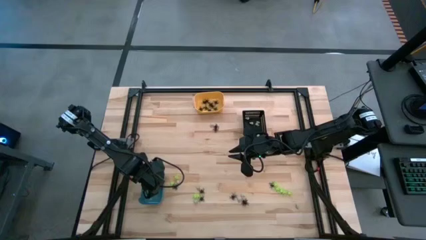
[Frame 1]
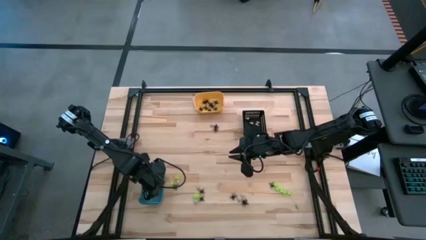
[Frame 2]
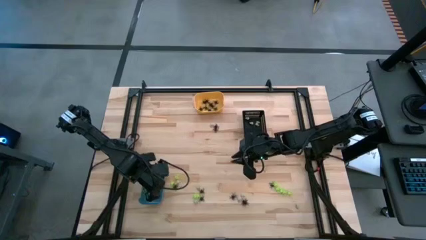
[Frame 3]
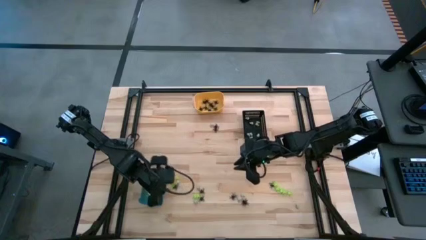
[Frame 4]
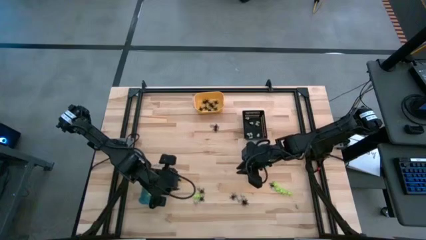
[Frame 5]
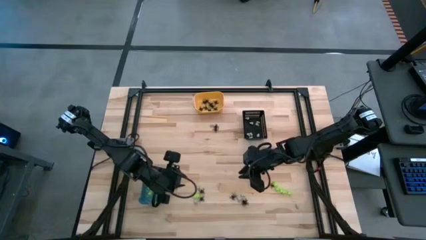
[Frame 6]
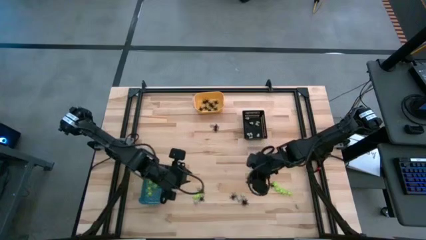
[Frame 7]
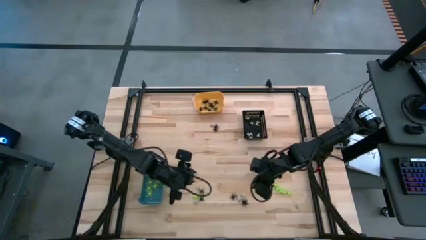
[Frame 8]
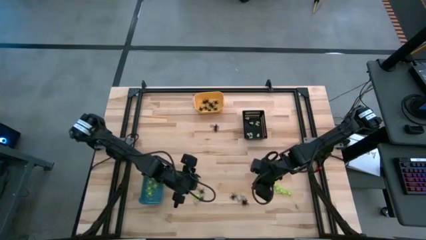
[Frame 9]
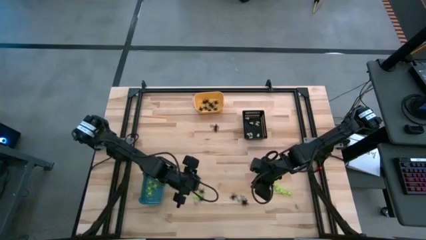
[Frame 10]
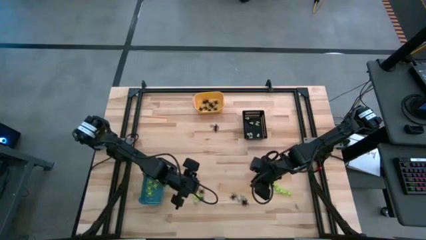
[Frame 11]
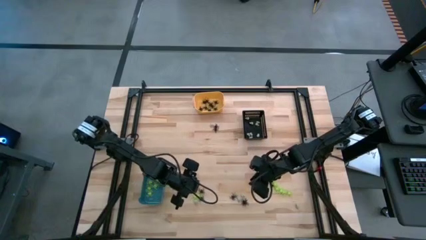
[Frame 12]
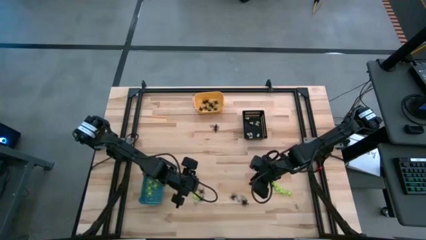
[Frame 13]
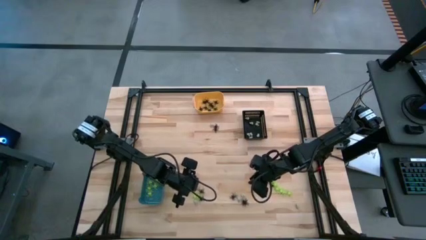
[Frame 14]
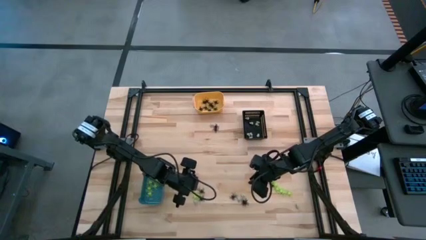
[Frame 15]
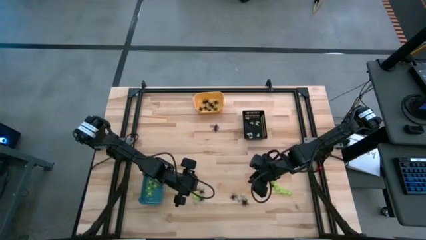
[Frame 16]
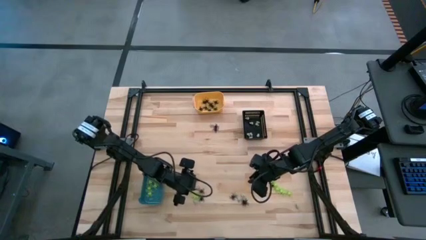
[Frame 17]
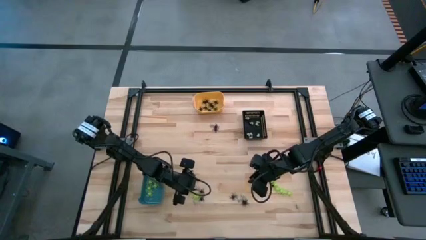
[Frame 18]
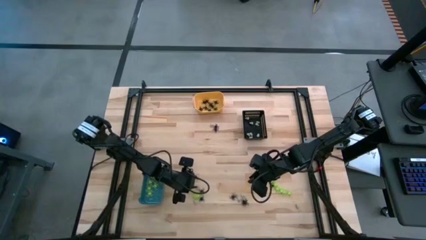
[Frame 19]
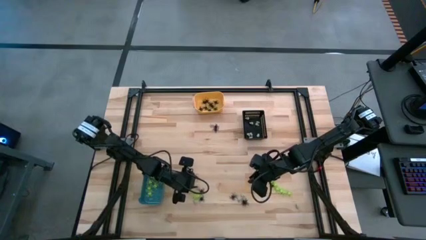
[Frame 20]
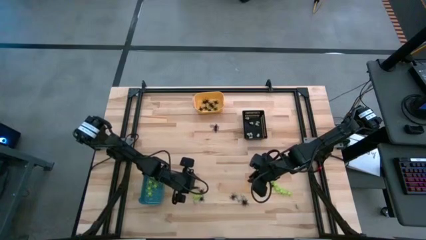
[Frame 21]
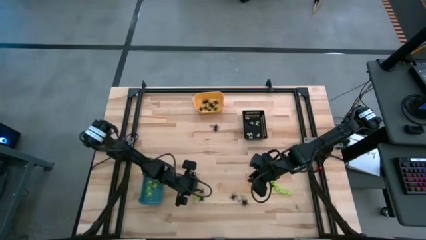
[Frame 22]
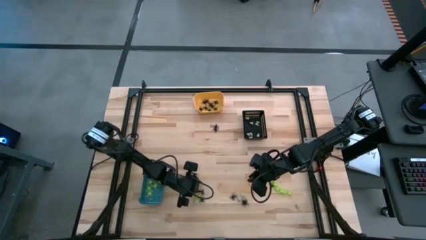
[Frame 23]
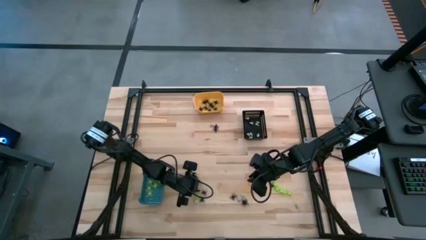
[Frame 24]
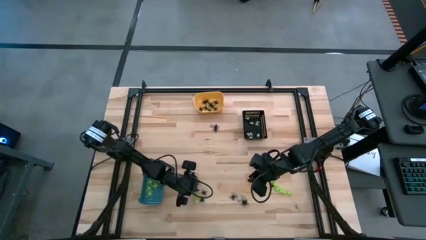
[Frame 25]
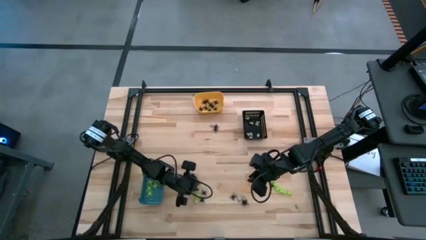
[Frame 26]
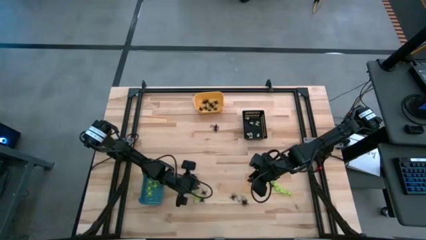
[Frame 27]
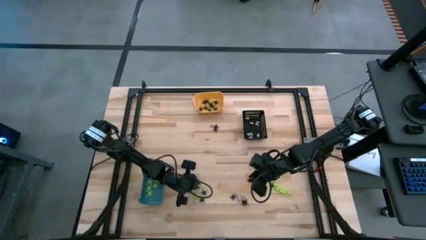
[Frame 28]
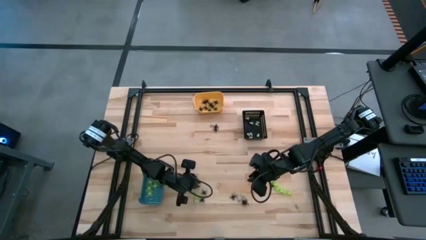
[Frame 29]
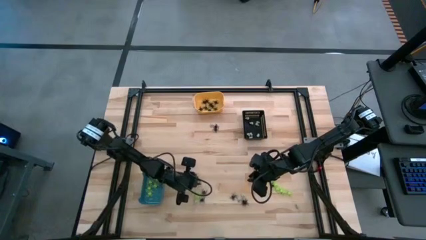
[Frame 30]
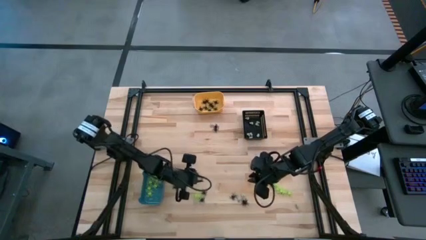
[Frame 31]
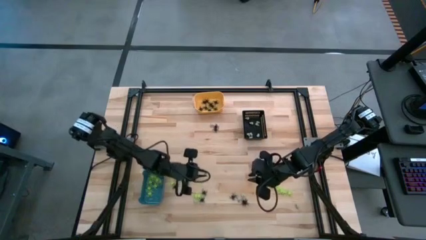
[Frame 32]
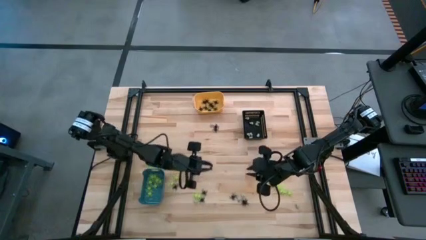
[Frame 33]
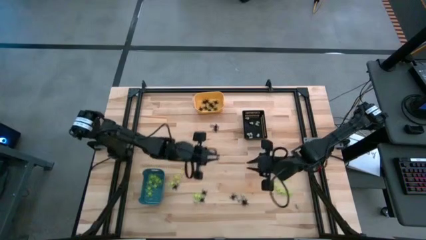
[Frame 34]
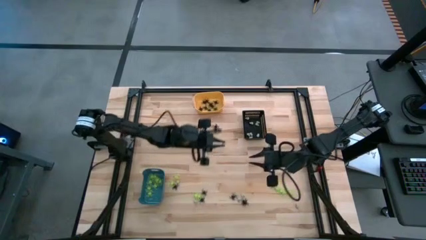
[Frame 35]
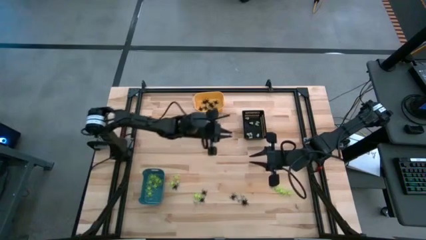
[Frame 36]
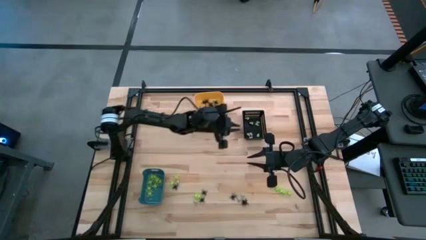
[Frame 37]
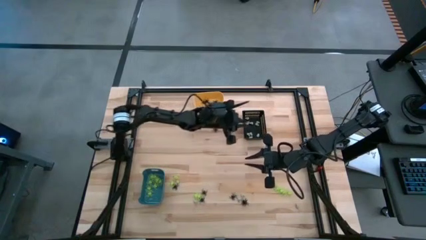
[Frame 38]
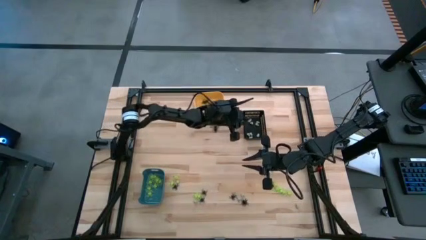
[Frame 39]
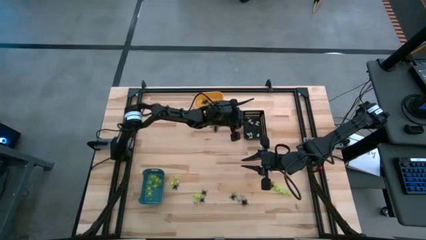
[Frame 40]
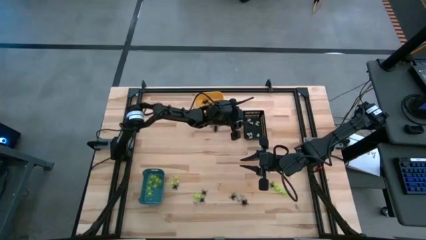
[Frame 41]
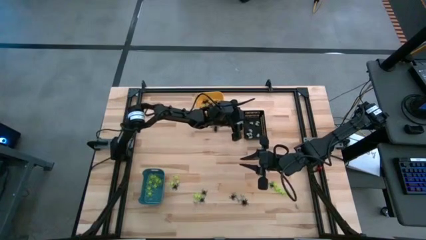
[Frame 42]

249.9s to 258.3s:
Task: Sort Halloween decoration
Put the white skull toy into the black bin

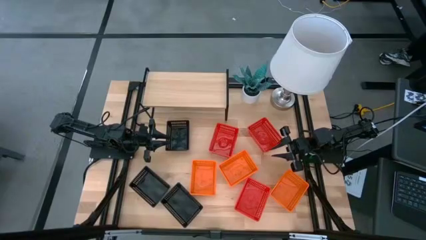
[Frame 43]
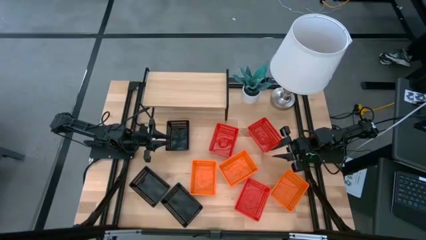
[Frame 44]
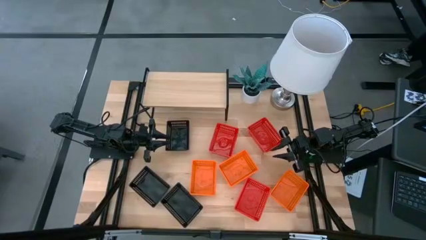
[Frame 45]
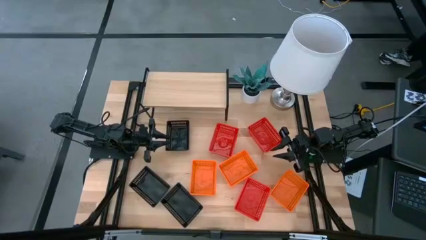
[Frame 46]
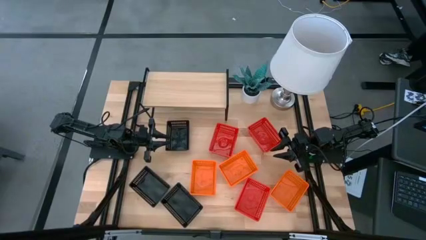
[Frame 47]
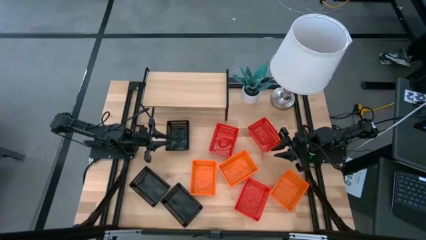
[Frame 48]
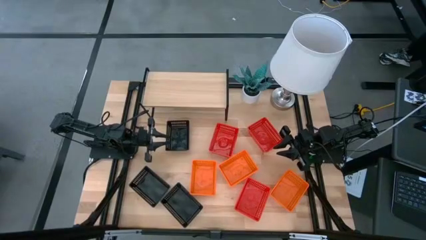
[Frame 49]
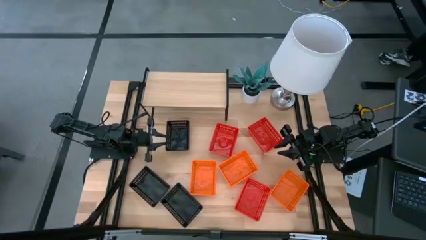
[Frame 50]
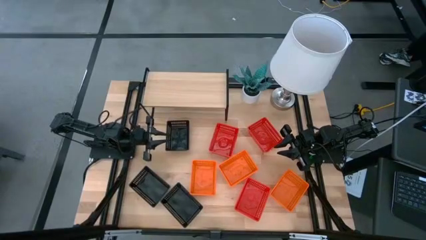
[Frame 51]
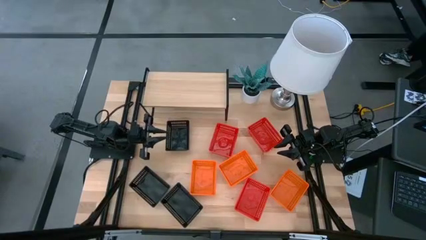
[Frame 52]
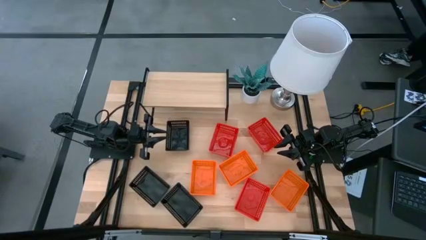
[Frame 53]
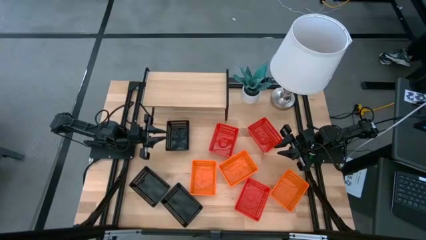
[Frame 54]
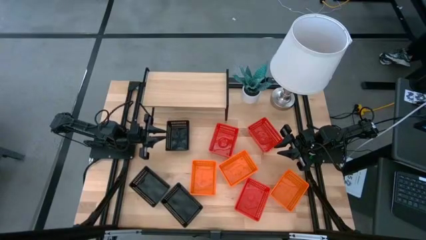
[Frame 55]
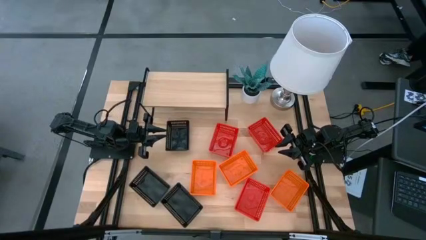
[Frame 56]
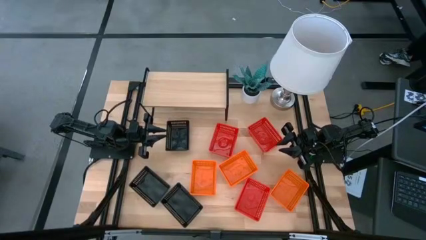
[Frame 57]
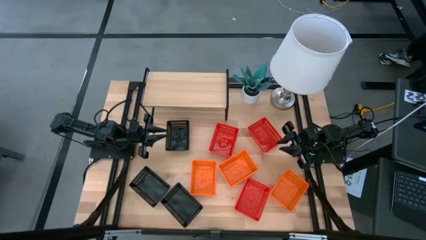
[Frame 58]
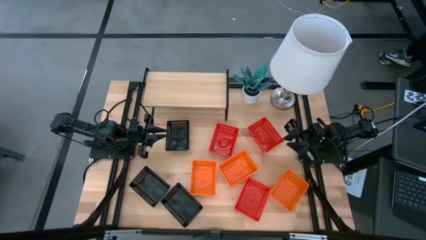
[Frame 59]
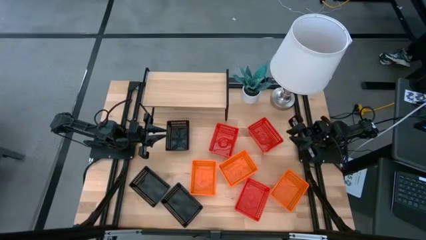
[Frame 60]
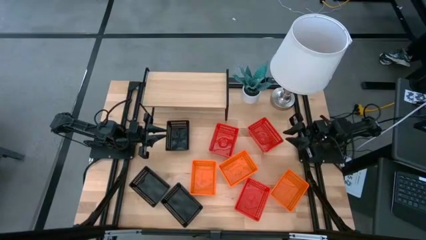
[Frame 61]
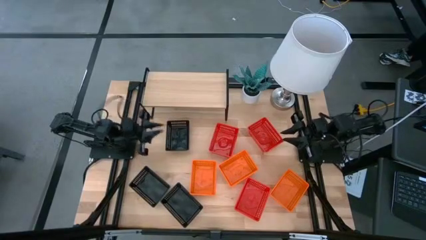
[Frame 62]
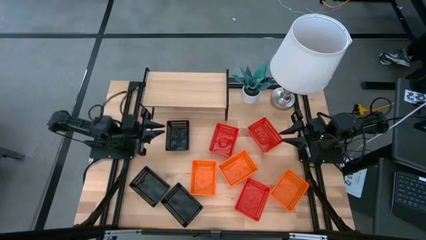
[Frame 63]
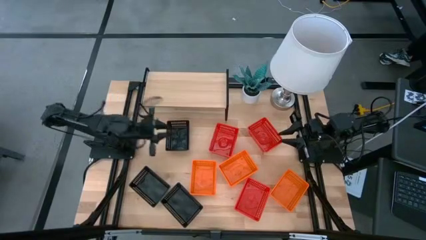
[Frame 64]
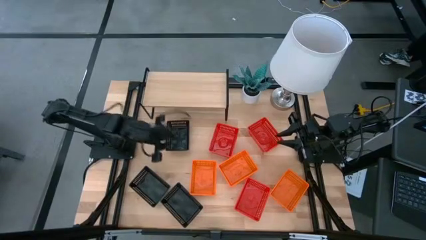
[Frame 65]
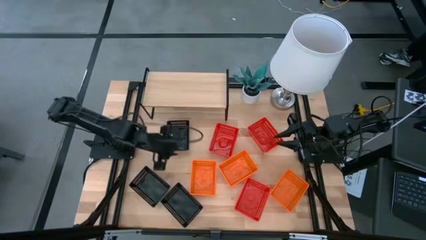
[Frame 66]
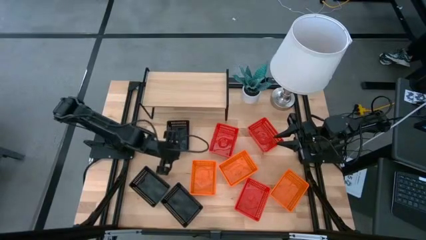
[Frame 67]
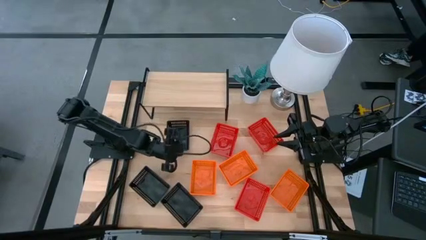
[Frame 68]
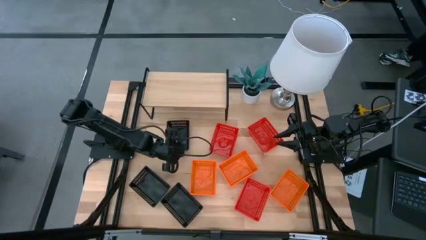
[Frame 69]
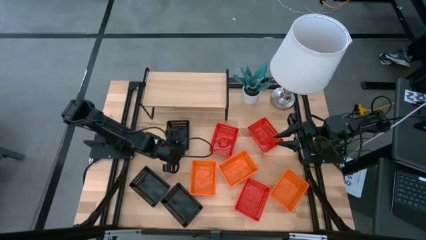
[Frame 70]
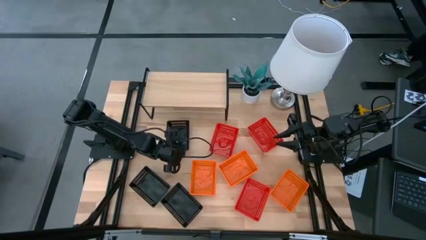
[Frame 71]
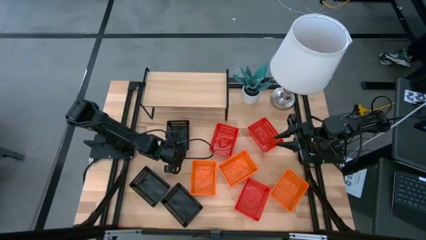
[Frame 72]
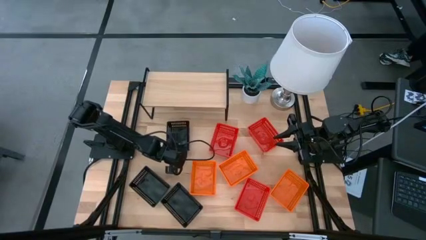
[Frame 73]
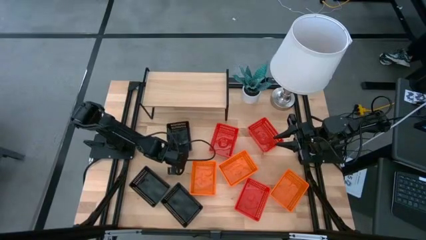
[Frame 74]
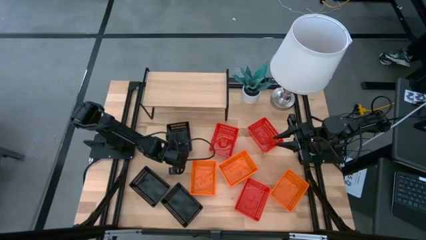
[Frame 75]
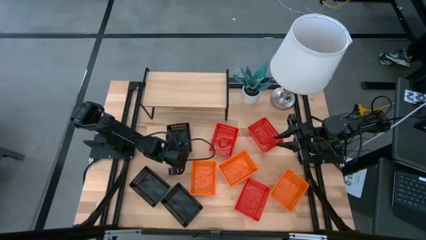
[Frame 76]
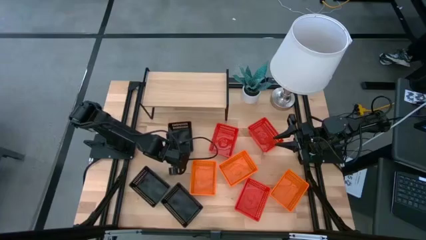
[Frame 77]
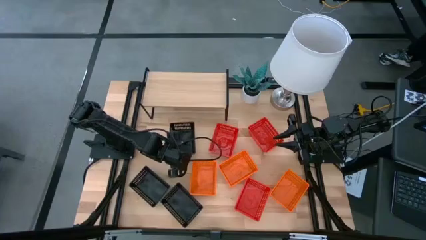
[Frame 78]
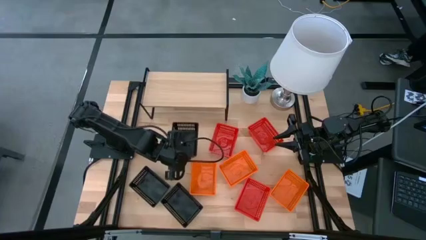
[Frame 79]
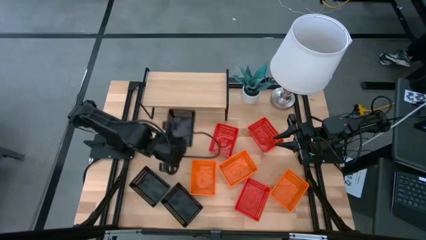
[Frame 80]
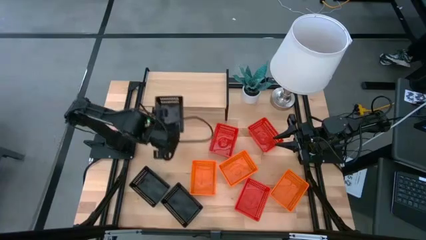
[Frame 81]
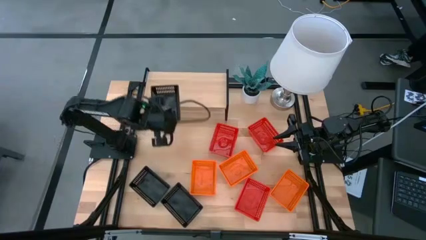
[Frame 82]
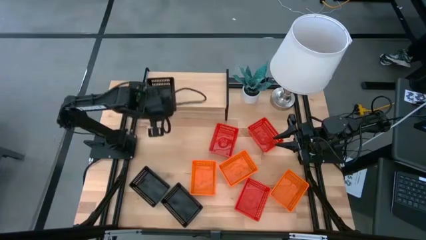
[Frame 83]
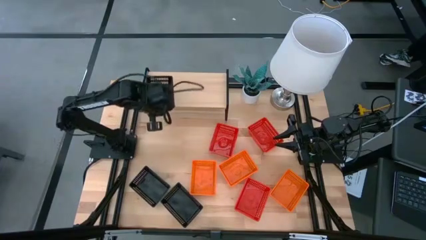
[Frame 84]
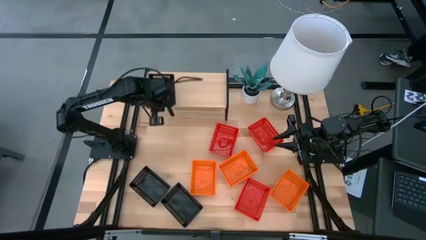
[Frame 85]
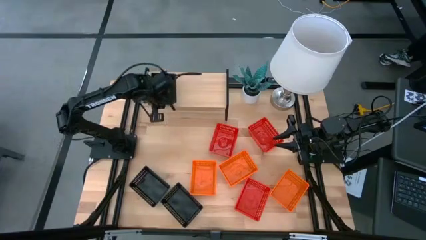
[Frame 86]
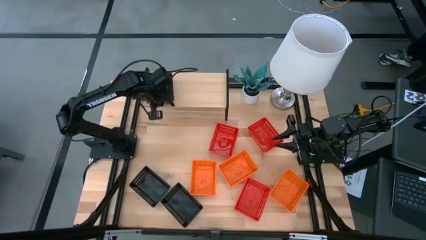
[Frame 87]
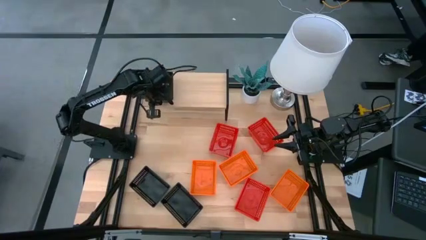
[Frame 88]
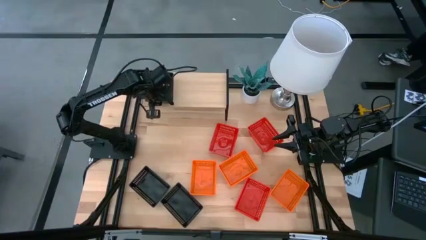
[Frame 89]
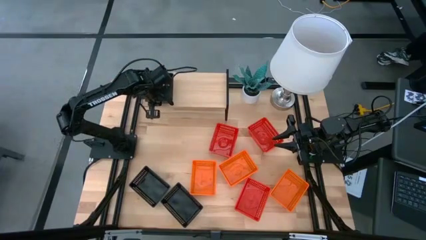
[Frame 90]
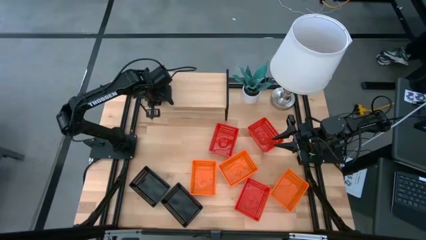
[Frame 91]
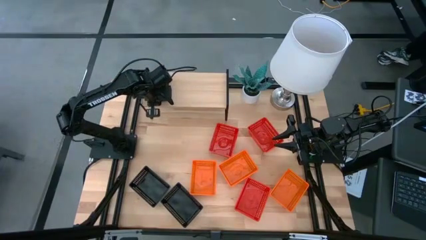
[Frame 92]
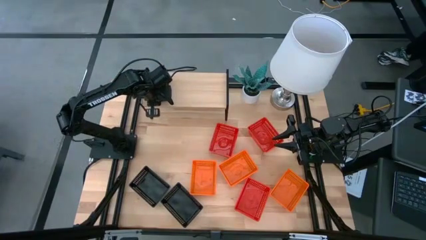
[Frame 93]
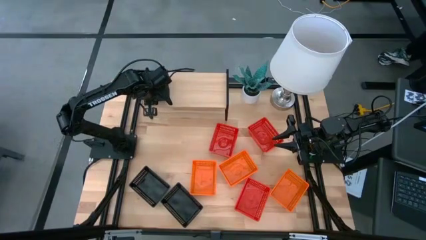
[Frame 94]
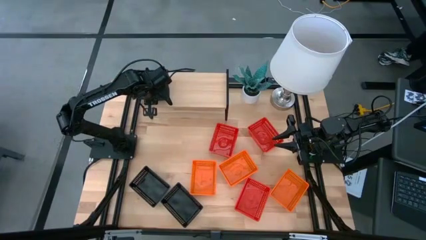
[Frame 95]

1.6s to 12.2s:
Task: Stack baskets on shelf by color
Put the top black bin on the shelf
